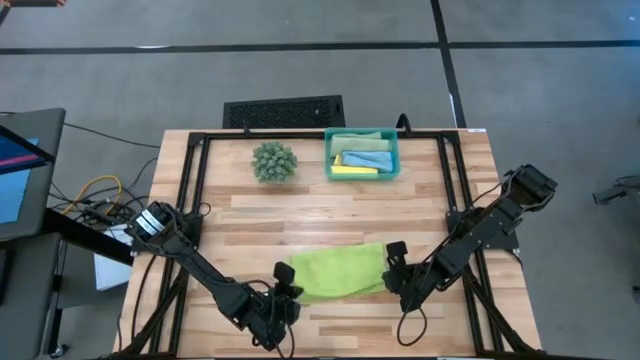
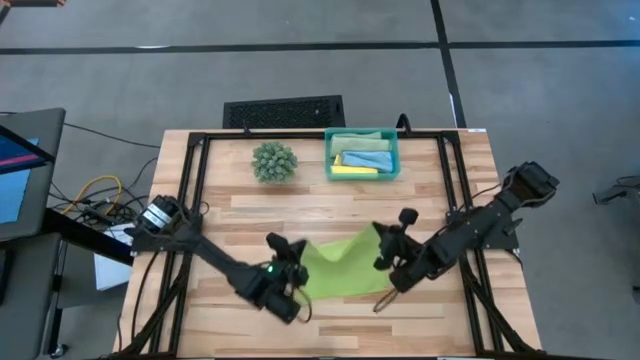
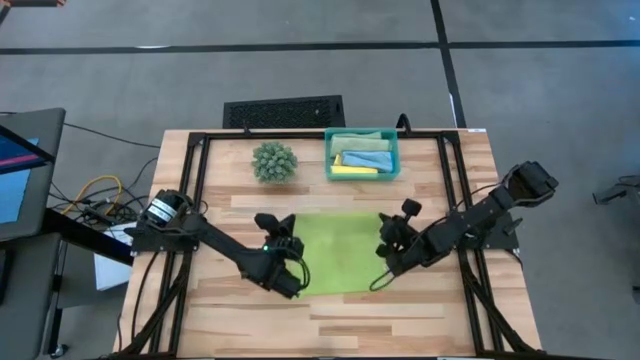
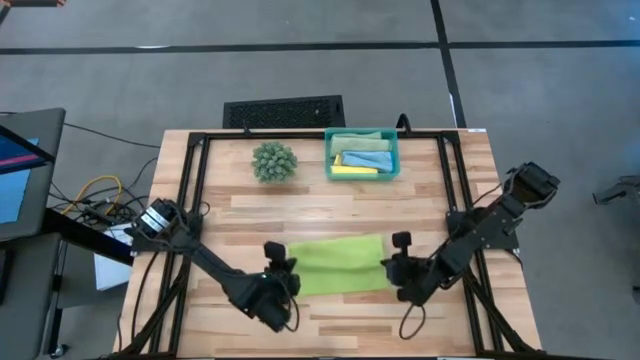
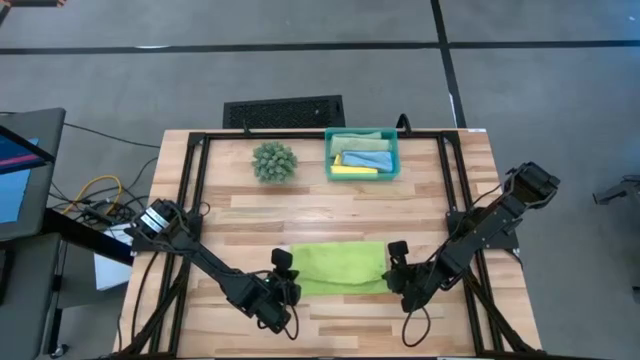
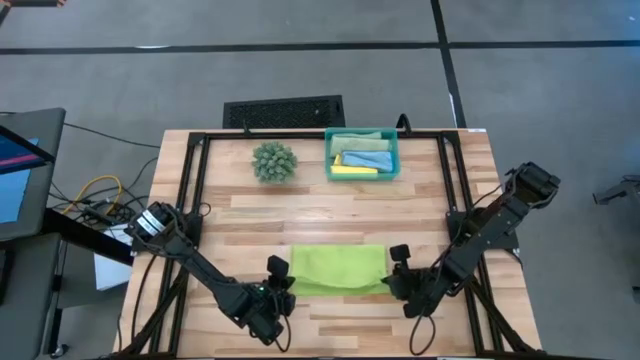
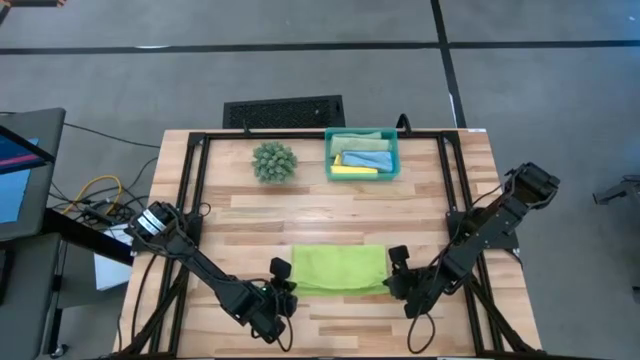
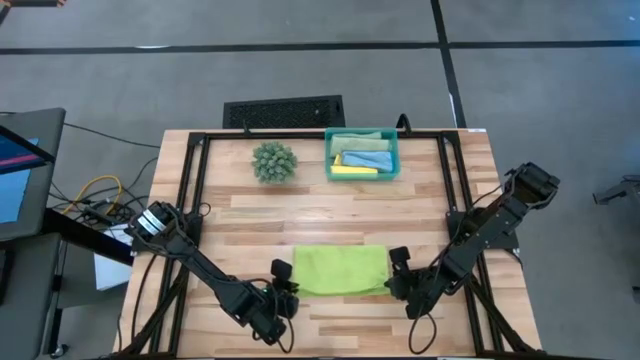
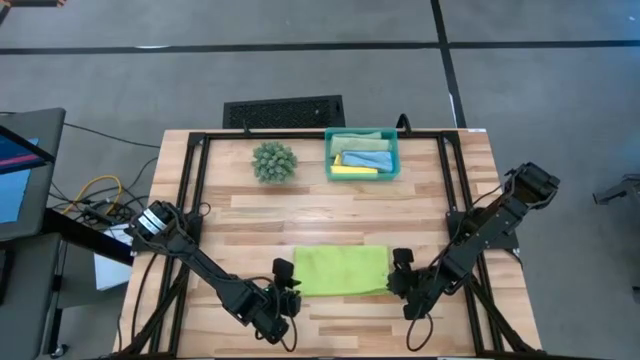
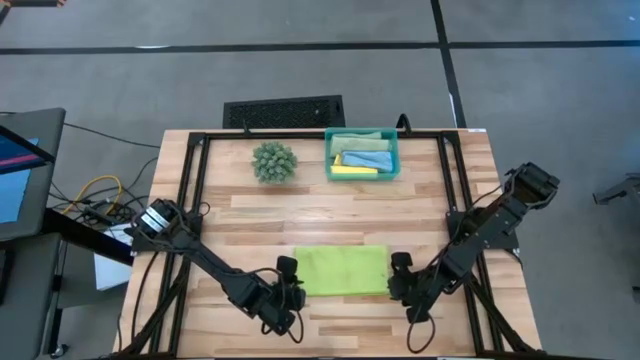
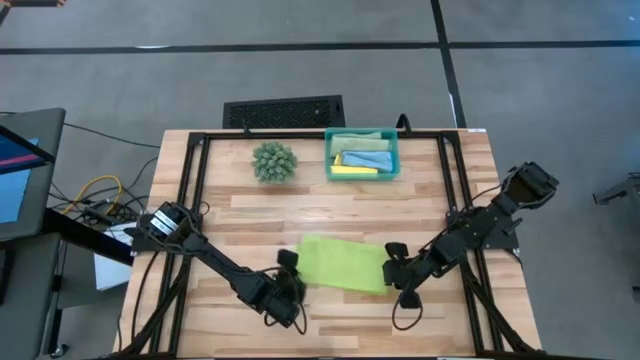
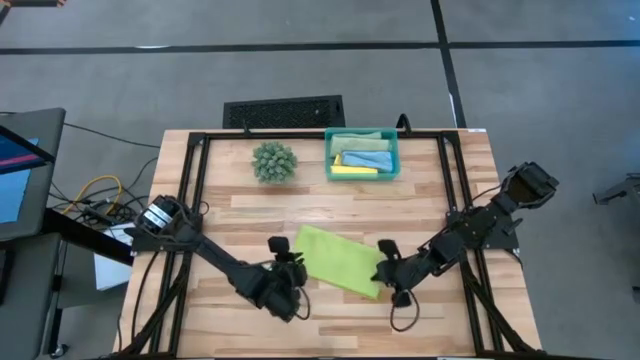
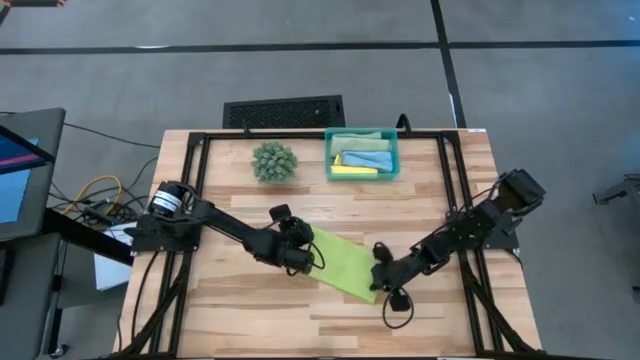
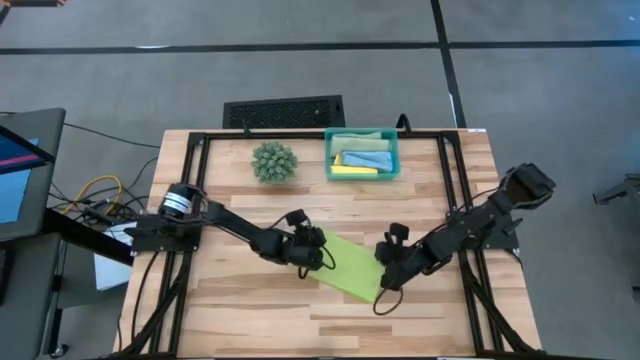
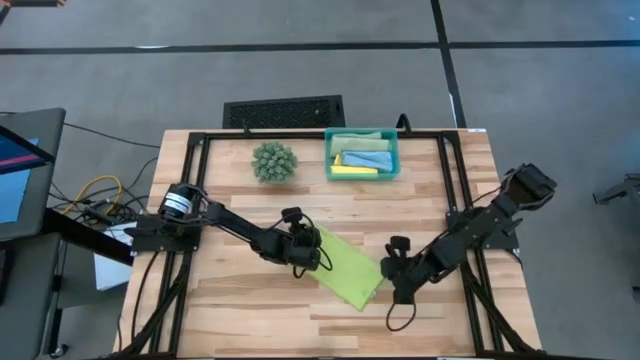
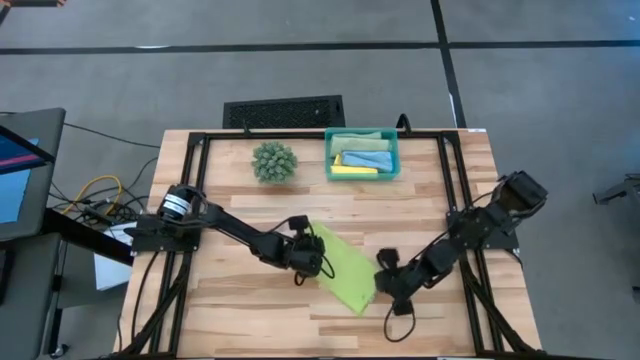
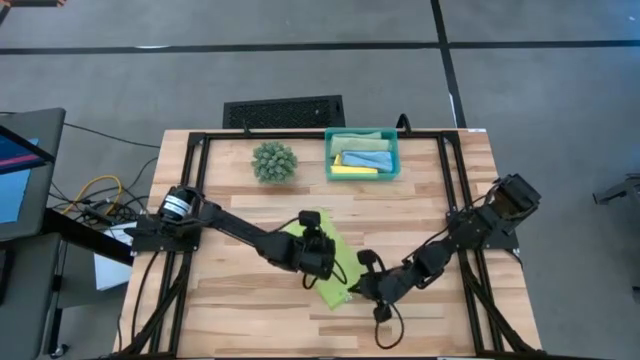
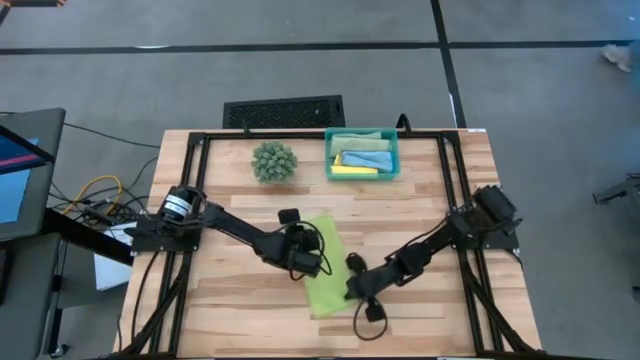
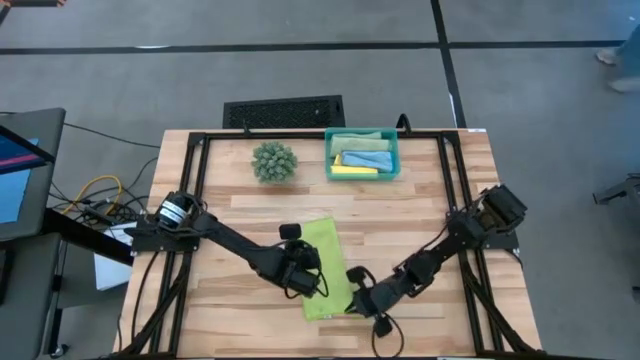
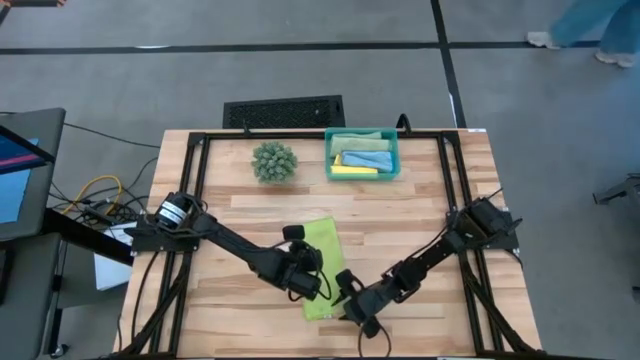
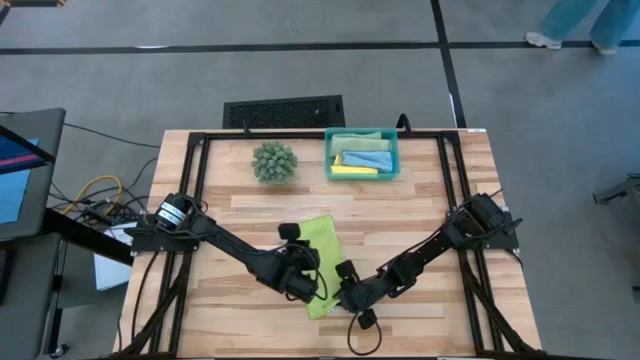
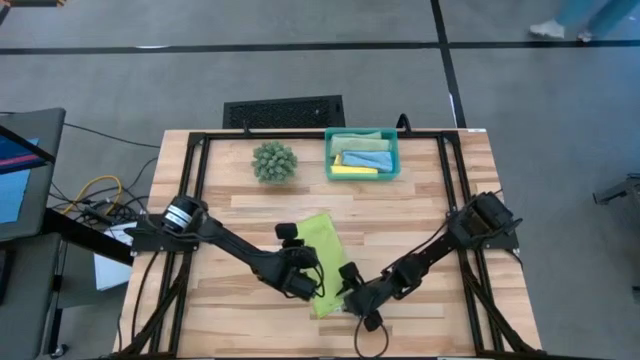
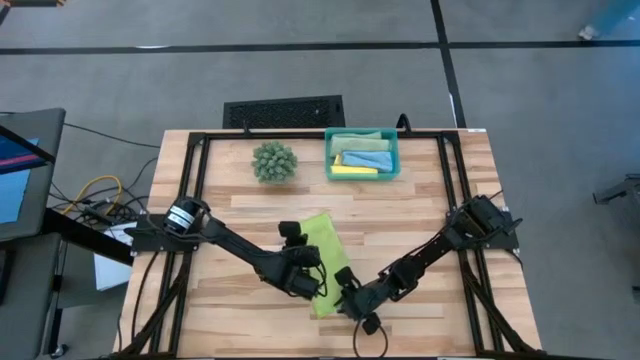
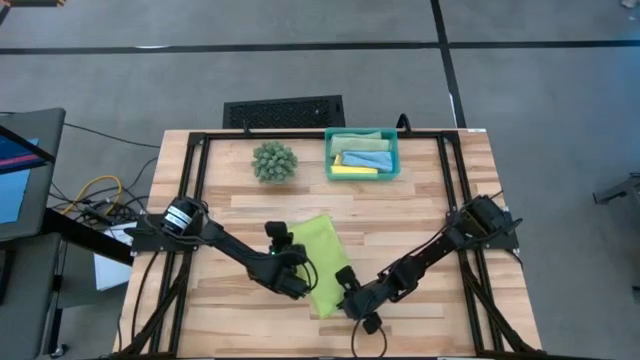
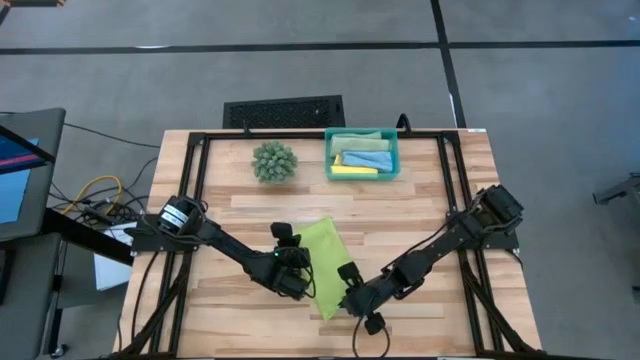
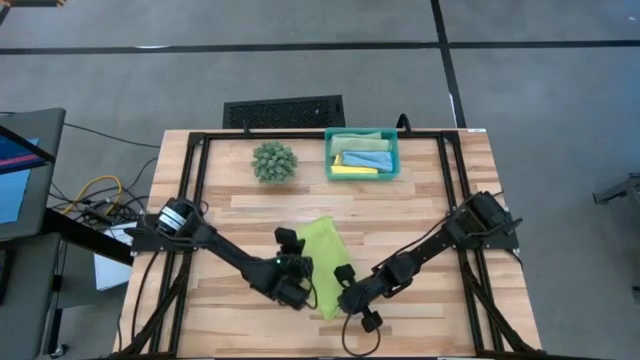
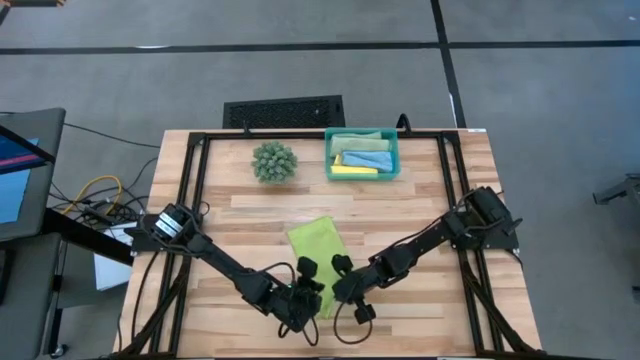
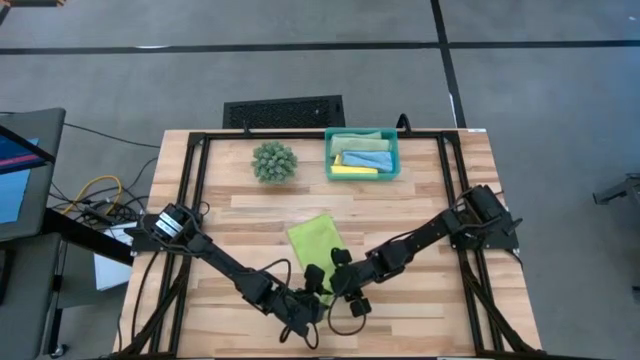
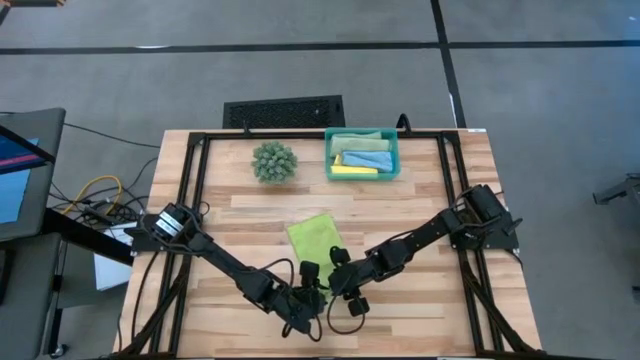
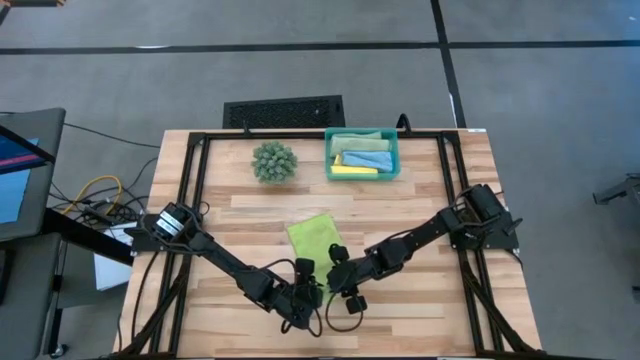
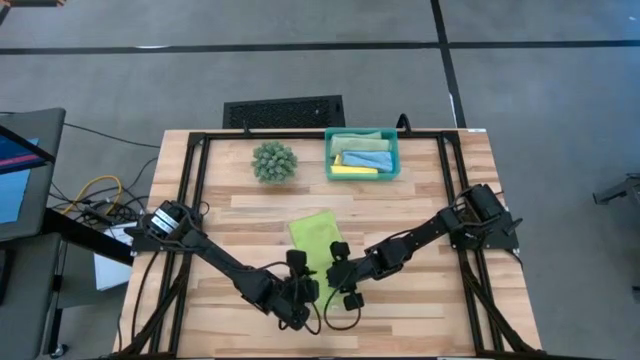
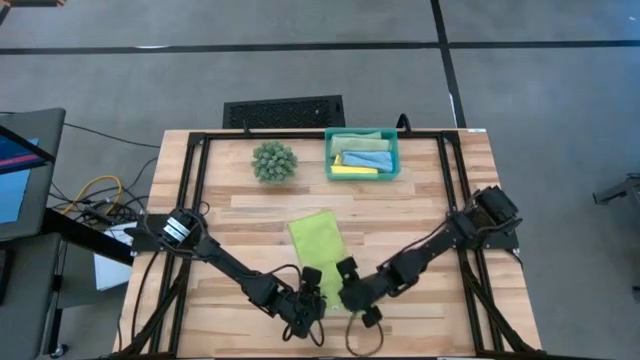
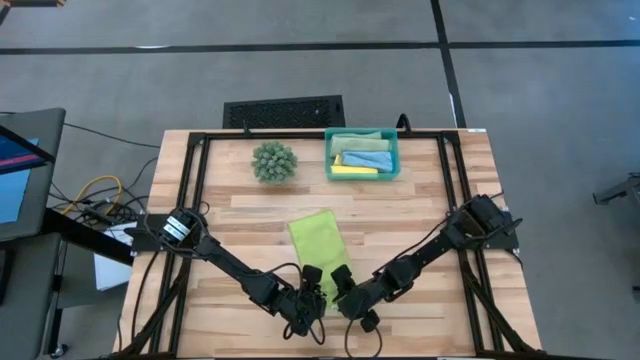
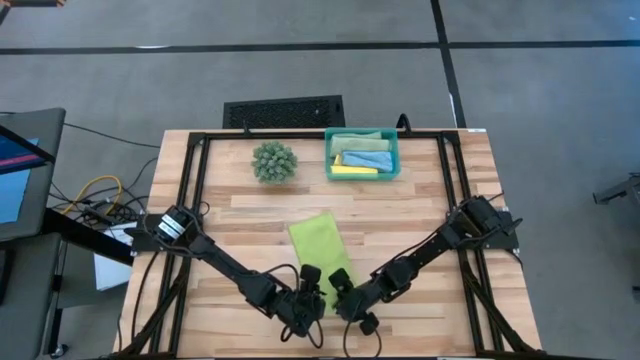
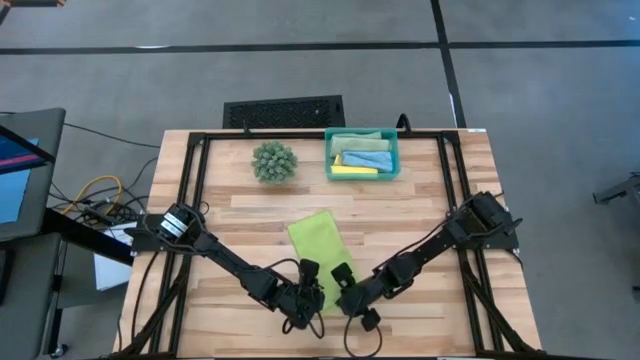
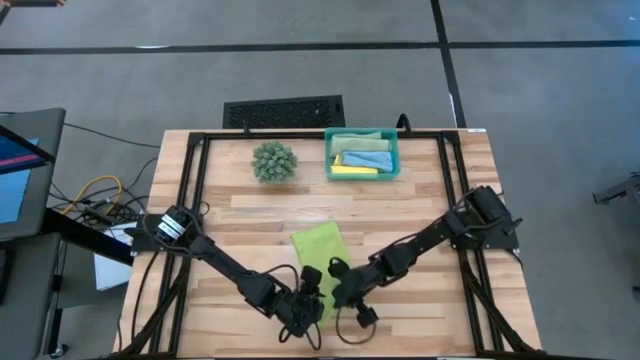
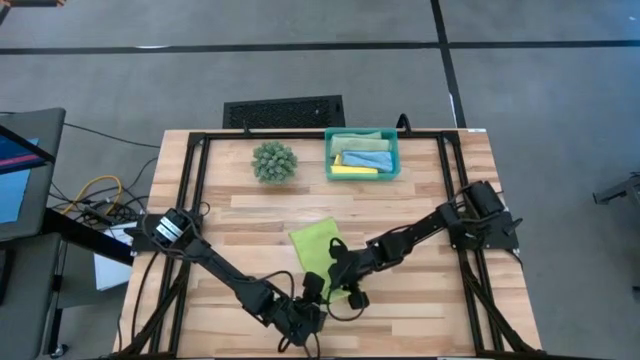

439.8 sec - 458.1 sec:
Task: Roll microfiber towels into tight, uniform cylinder then place into a basket
Roll the green microfiber cloth

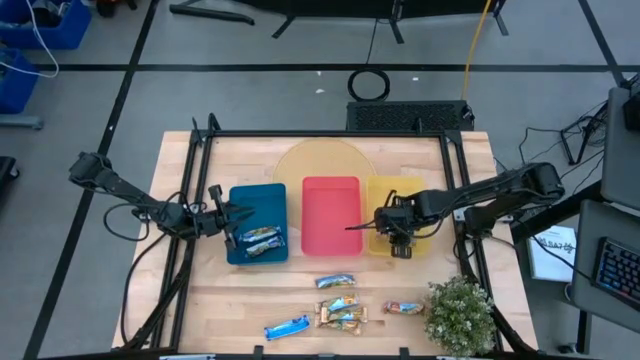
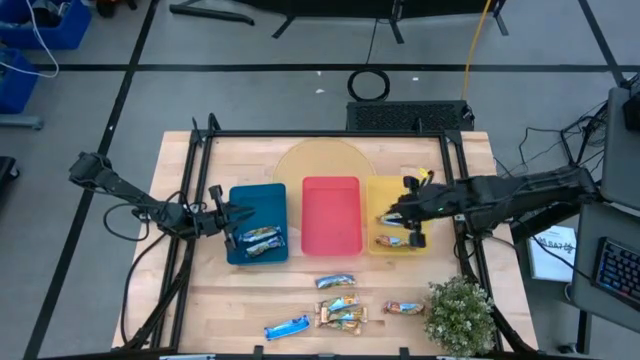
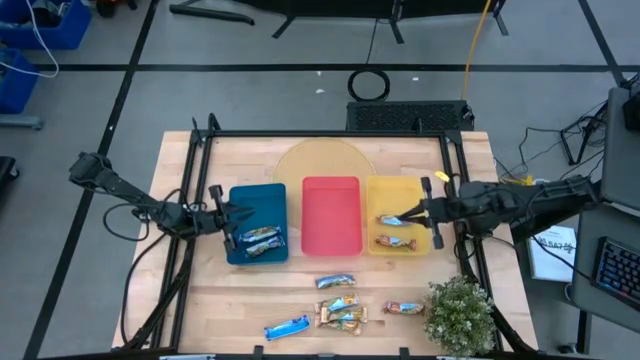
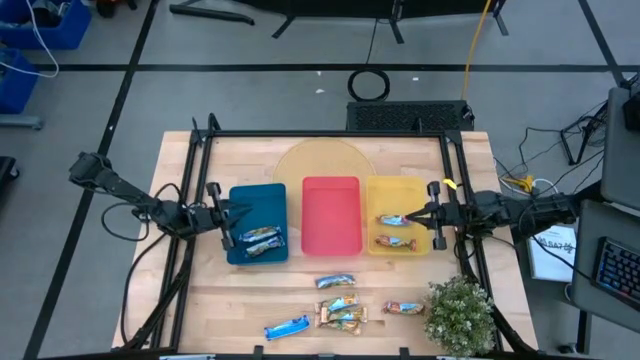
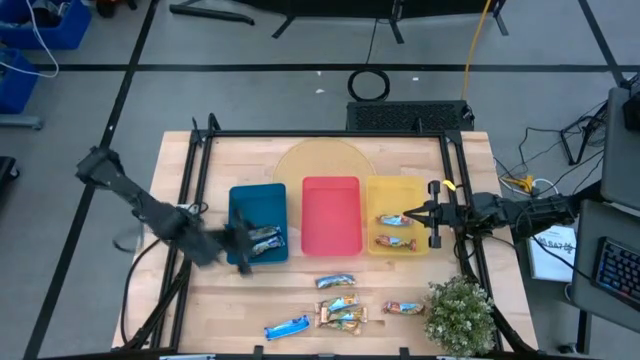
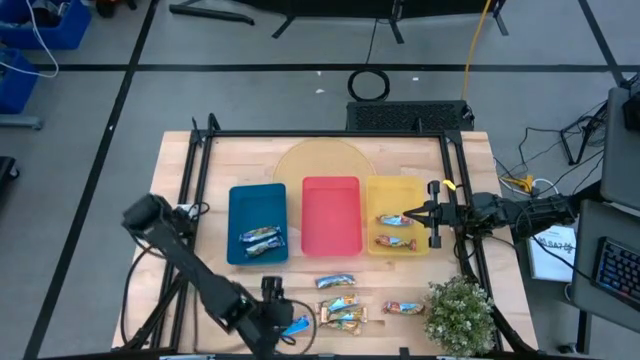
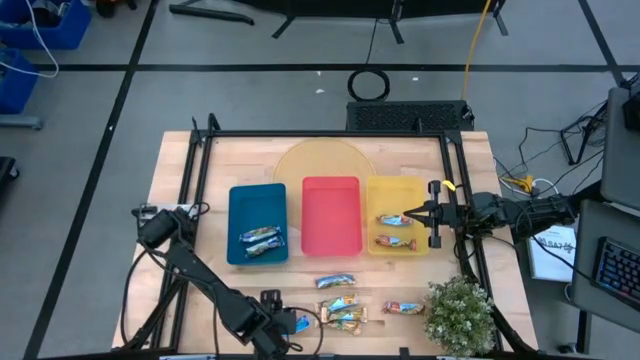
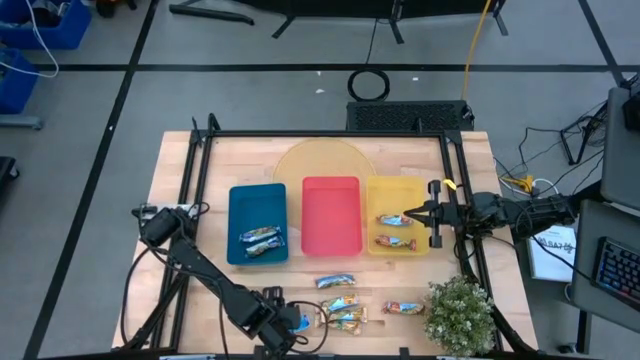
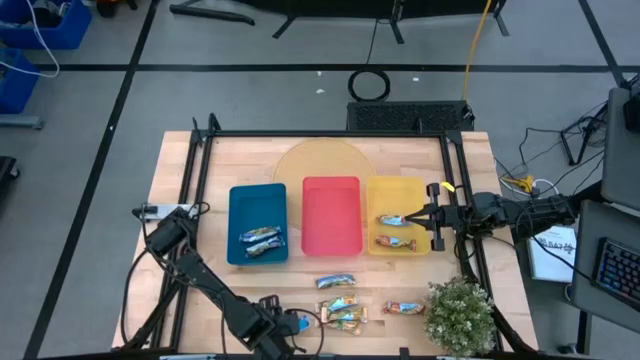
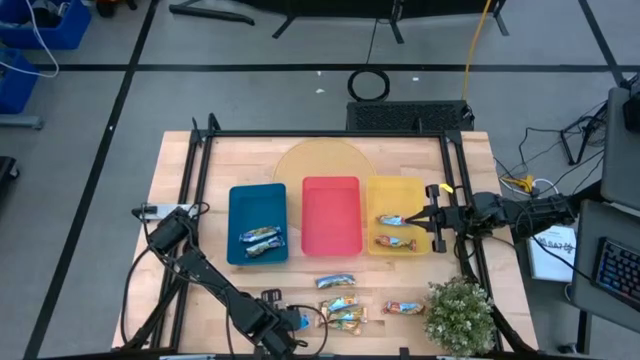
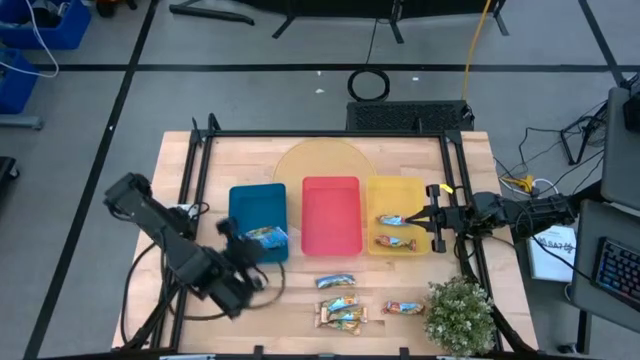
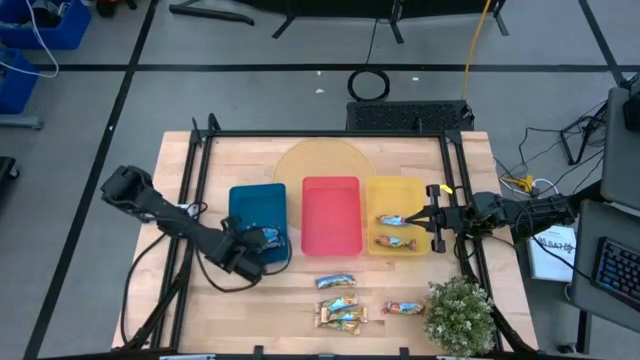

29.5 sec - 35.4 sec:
Task: Pick and place Granola Bars by type
Put the blue granola bar into the blue bin
